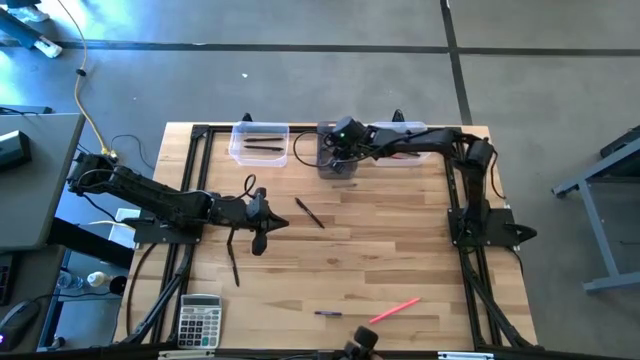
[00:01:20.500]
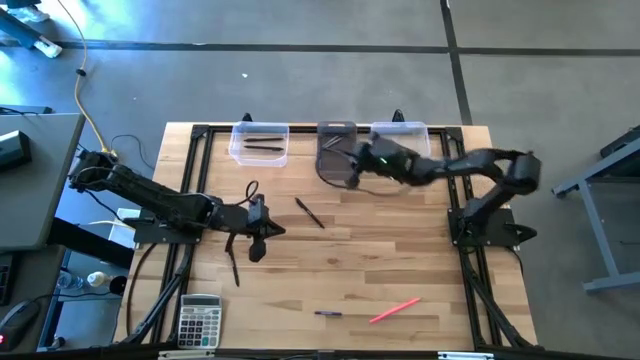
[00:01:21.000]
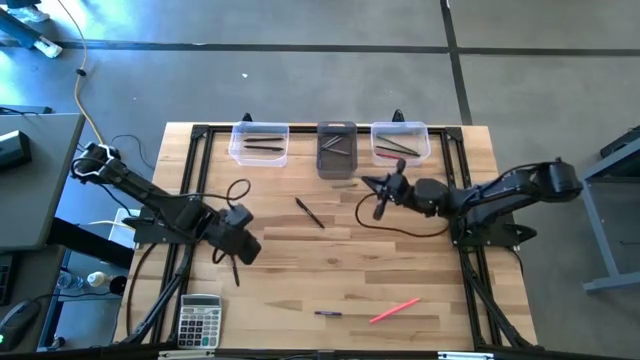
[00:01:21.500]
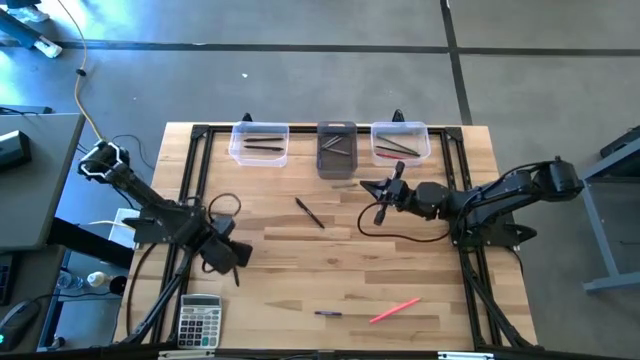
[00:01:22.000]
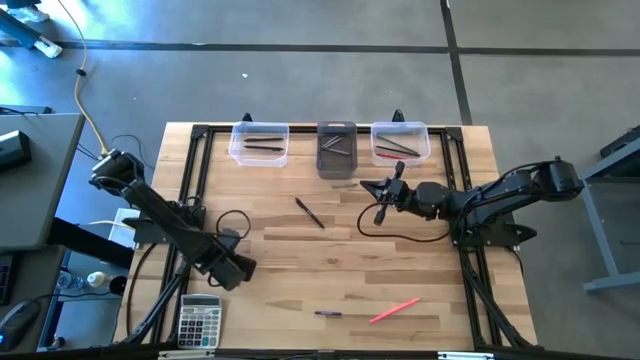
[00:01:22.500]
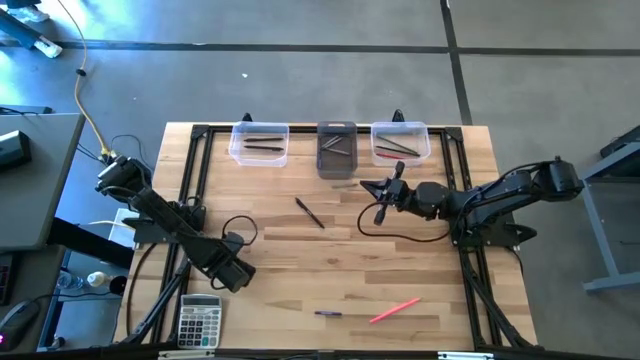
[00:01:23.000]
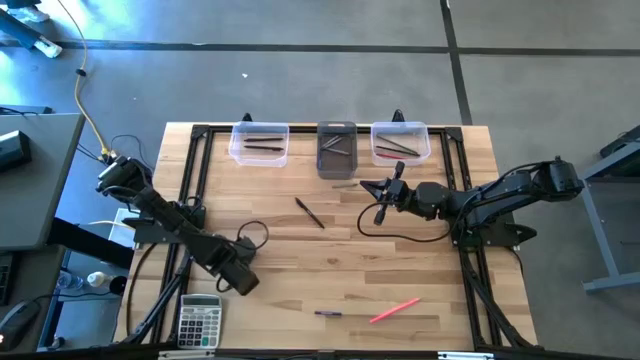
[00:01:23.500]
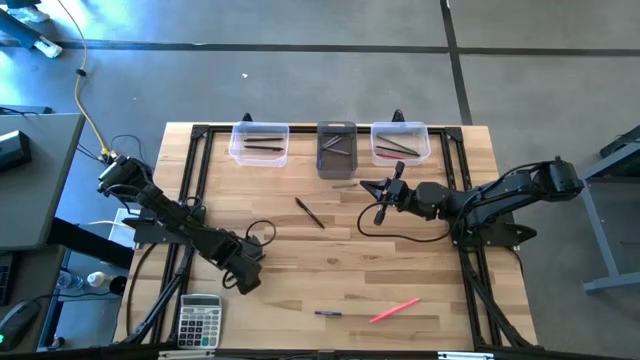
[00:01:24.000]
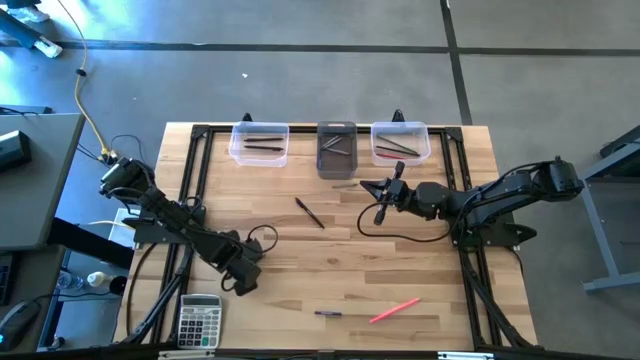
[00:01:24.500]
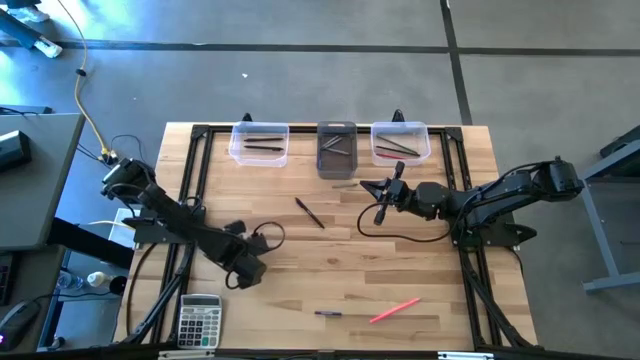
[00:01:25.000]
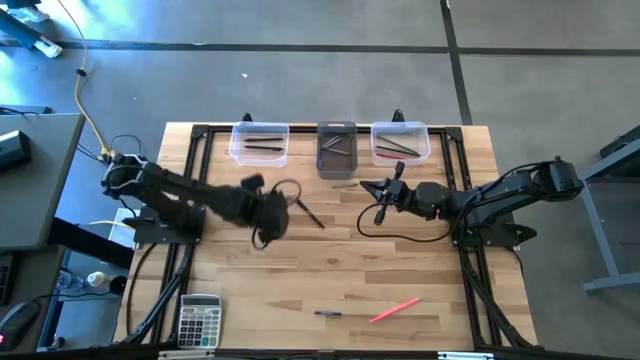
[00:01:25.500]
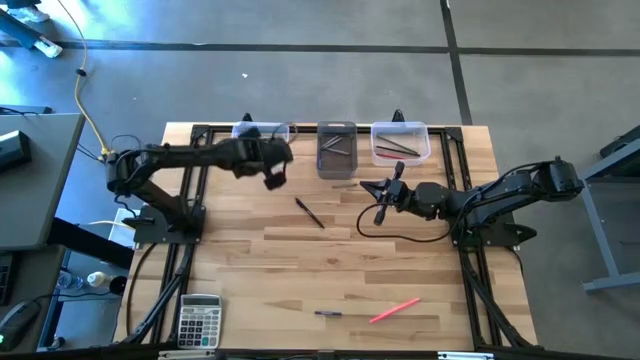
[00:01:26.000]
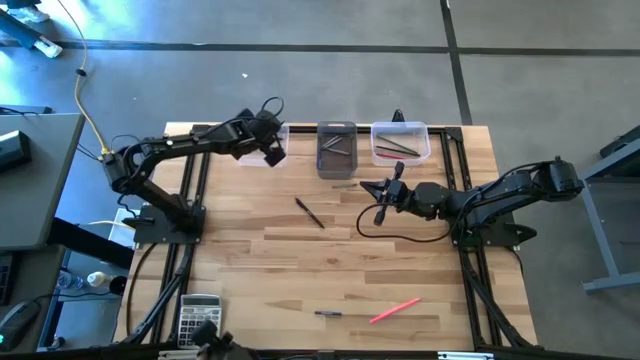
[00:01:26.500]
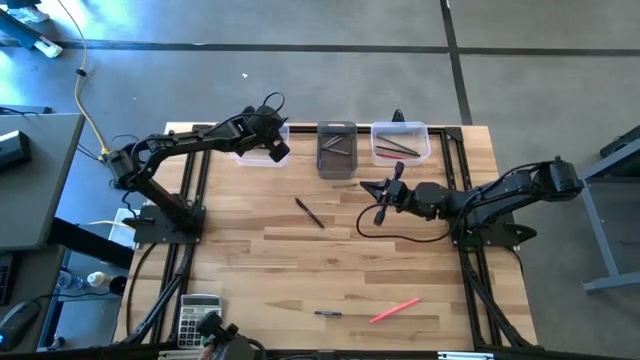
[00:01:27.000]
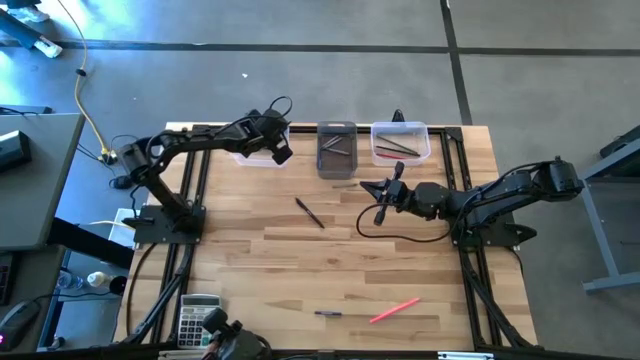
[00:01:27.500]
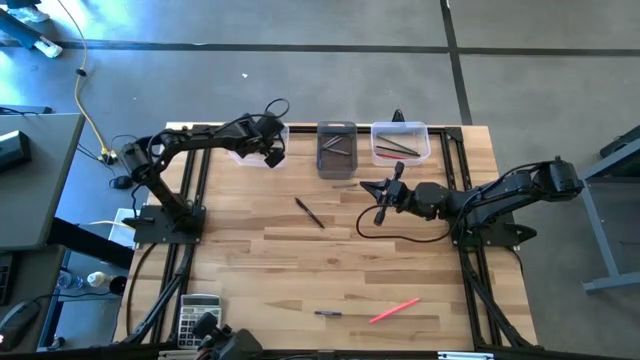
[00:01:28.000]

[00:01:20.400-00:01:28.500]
Task: Sort crayons/erasers/pens/pencils in bins
Put the black pen into the left transparent bin

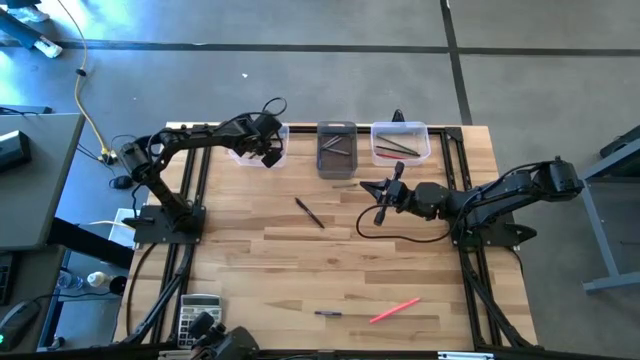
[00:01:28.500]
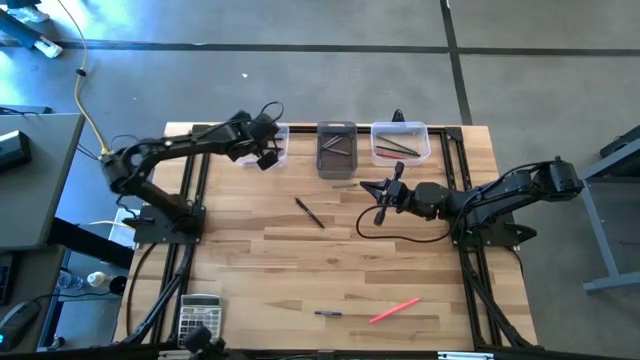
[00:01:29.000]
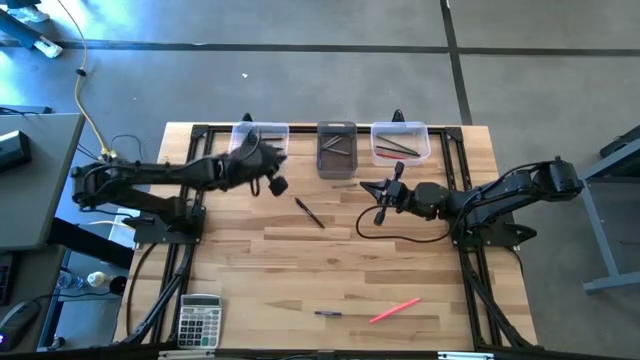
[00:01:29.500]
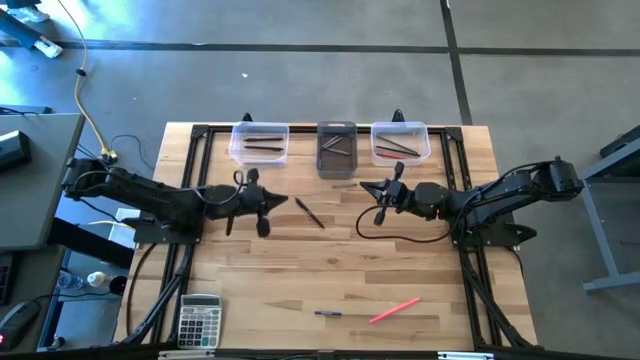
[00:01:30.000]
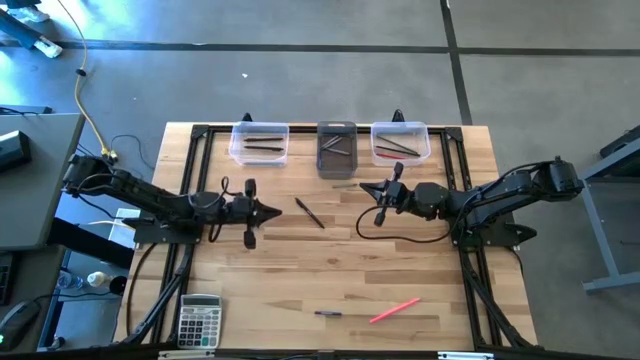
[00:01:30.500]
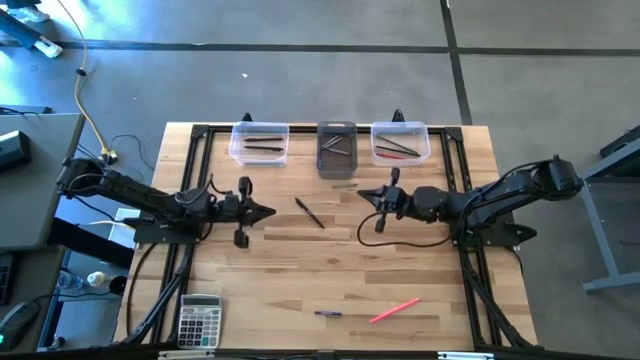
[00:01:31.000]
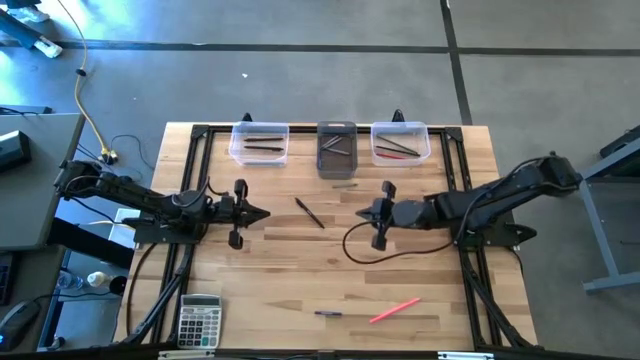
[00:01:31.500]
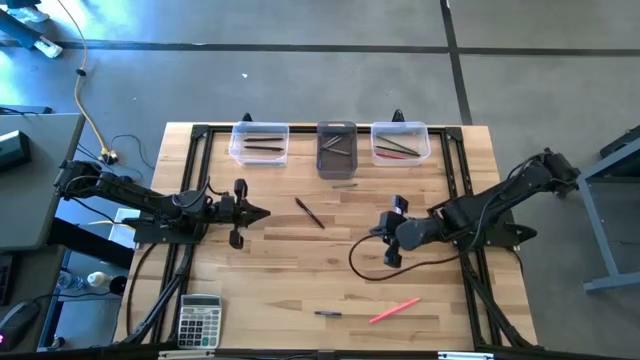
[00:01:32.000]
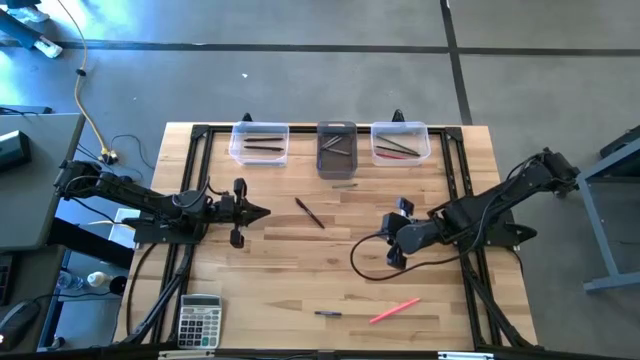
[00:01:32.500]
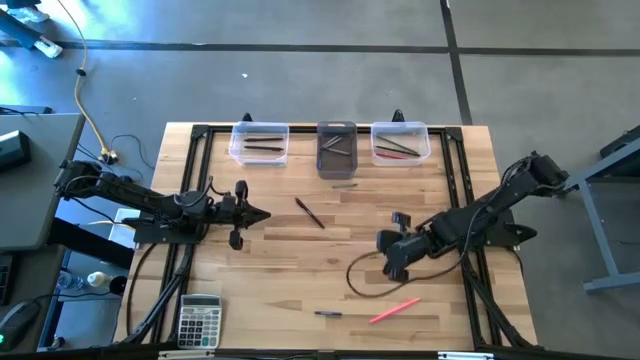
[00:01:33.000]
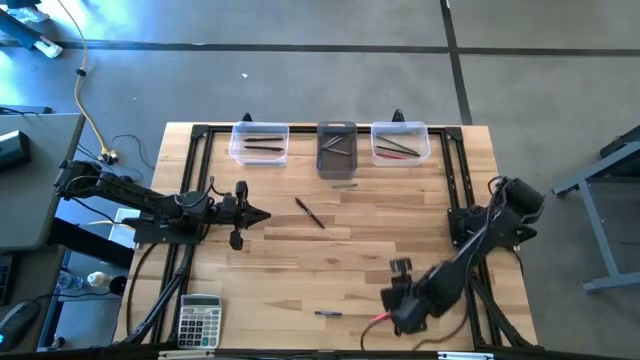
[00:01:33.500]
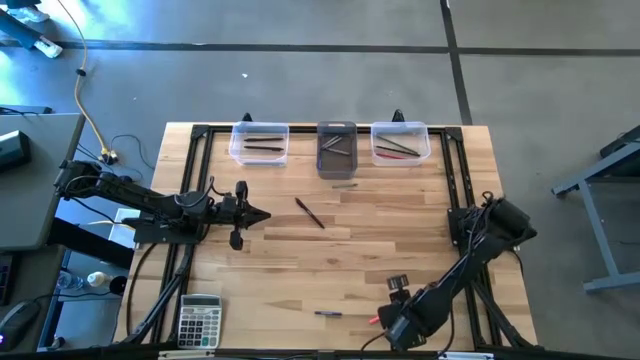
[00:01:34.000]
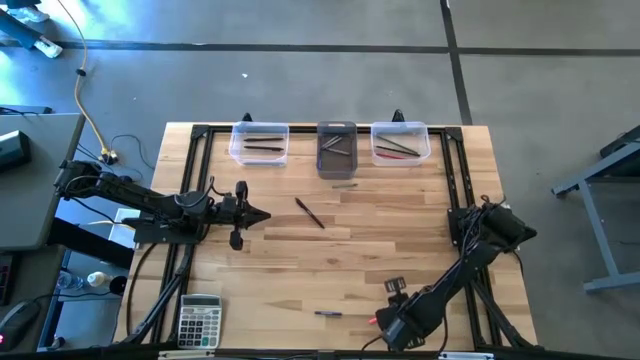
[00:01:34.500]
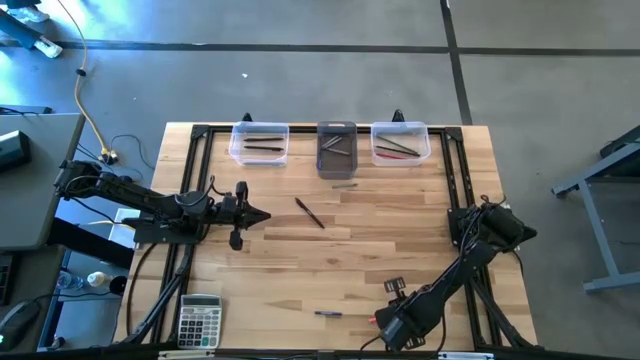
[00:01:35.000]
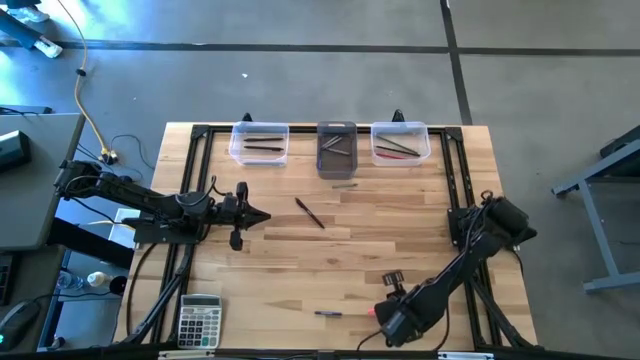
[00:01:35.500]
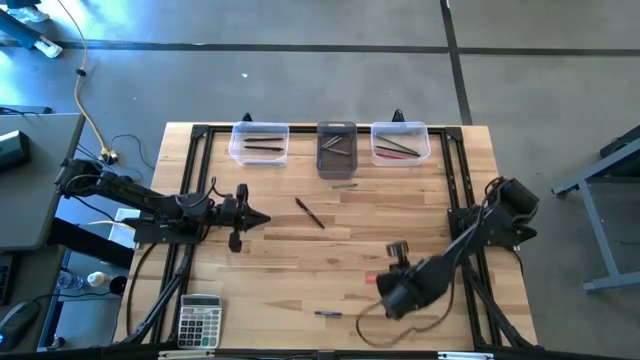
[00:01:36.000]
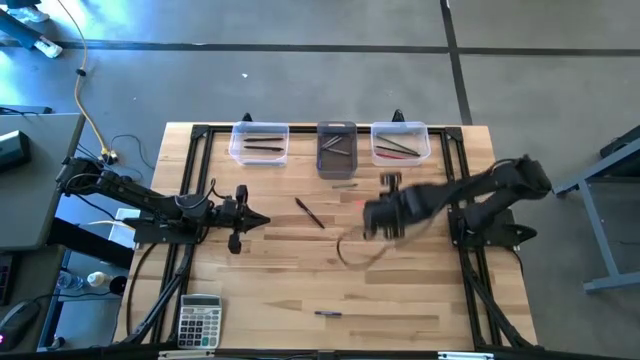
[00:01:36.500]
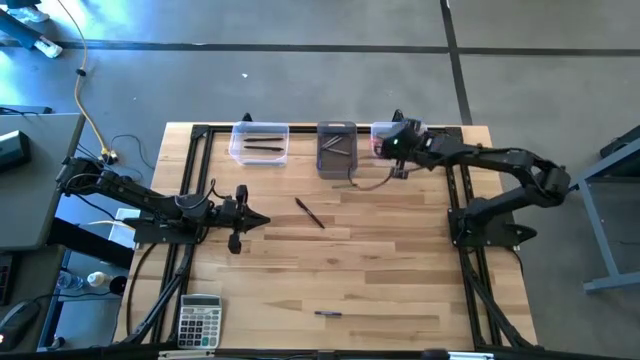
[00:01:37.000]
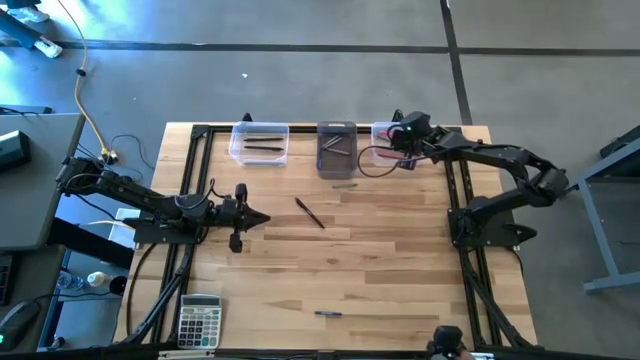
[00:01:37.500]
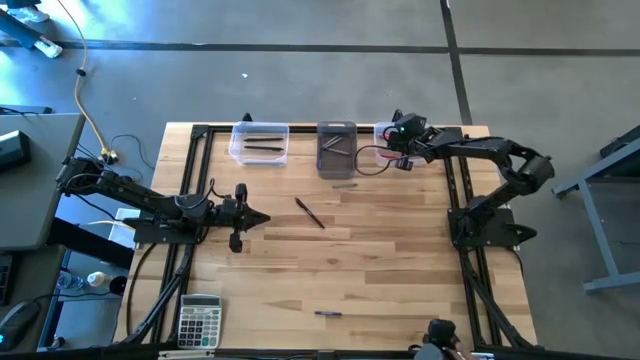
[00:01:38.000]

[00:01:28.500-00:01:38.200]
Put the pink pencil into the right transparent bin

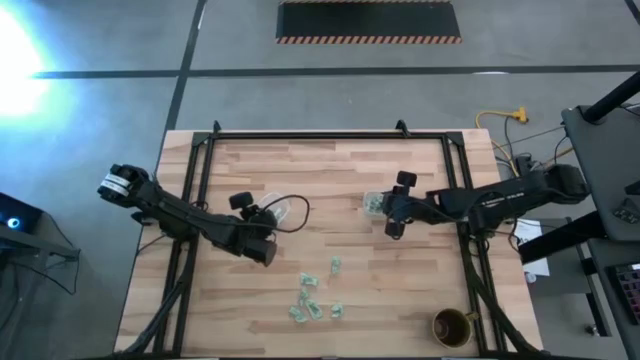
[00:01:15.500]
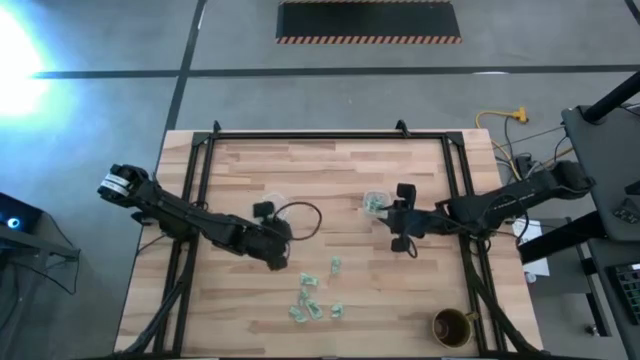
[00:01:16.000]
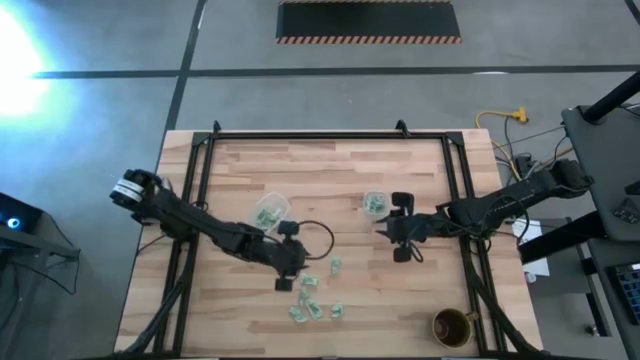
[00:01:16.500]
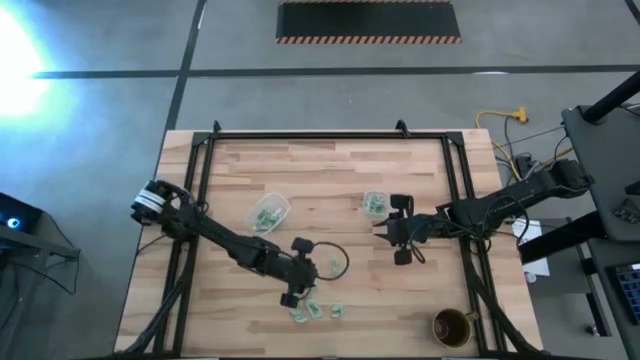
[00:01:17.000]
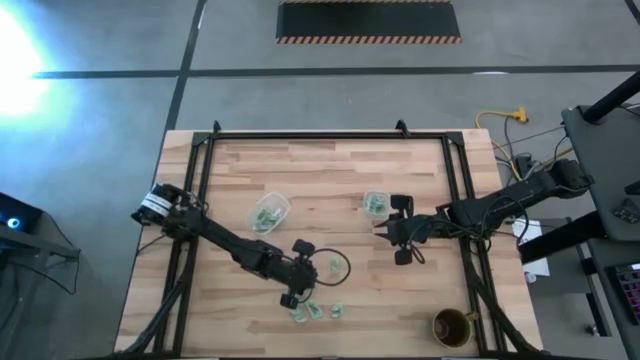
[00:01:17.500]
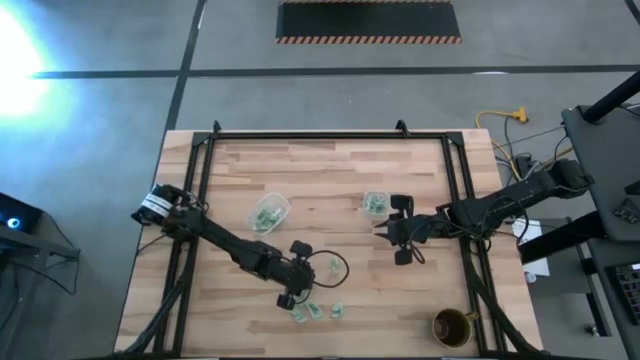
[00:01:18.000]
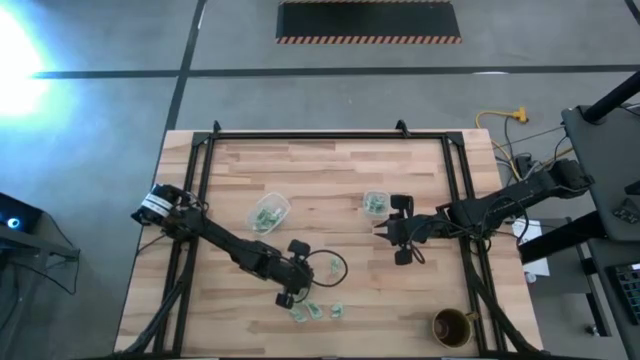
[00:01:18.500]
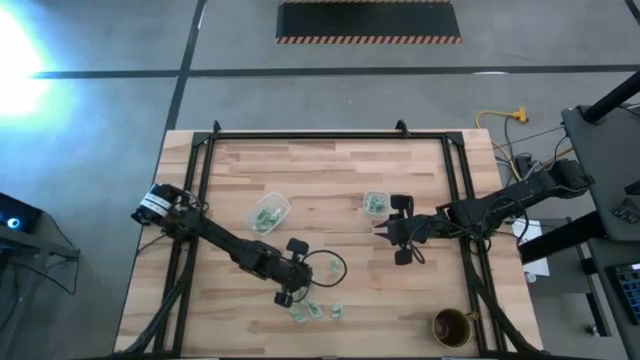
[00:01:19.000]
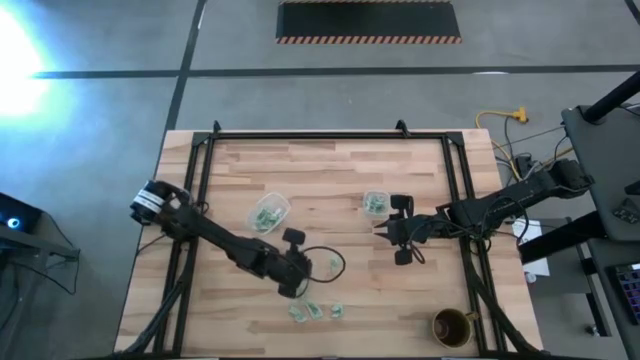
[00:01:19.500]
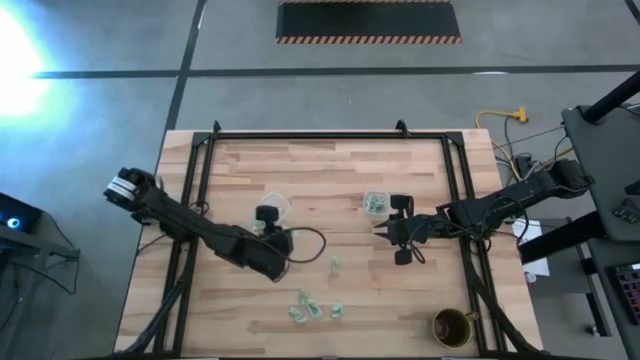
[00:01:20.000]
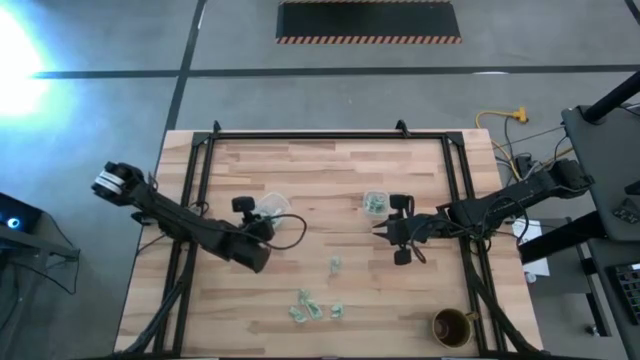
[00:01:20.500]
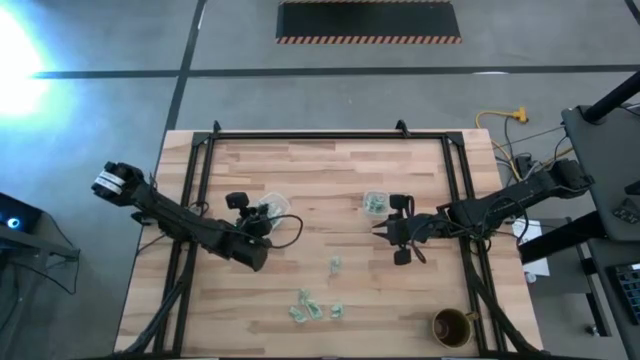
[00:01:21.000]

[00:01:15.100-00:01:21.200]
Task: Pick and place Stevia / Truvia into bins
Put the light green stevia packet into the left transparent container
